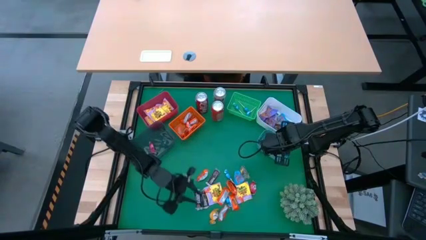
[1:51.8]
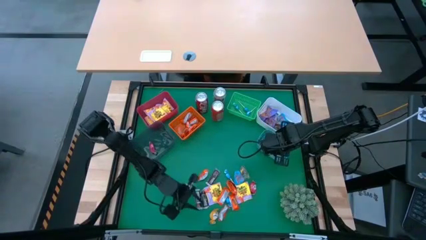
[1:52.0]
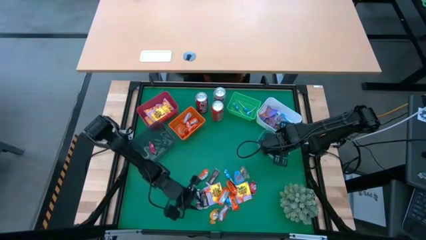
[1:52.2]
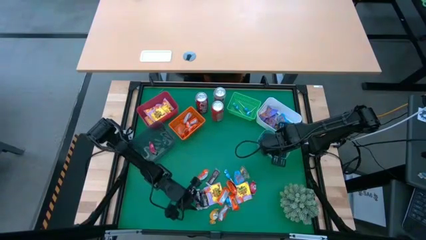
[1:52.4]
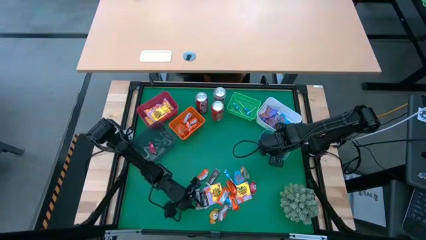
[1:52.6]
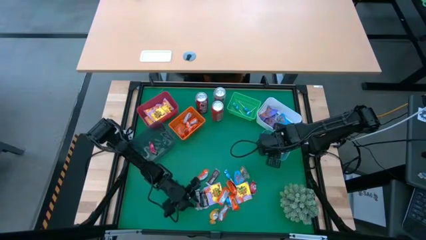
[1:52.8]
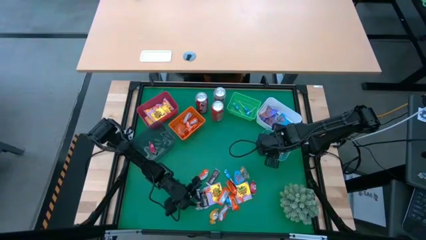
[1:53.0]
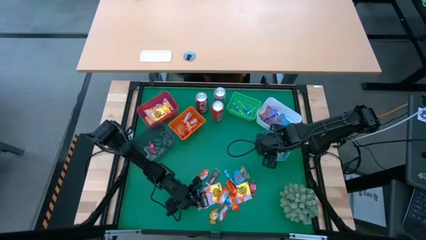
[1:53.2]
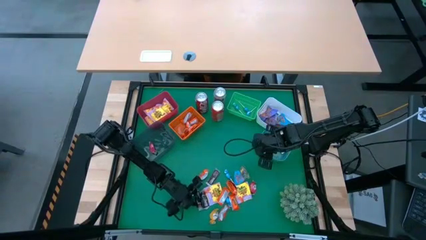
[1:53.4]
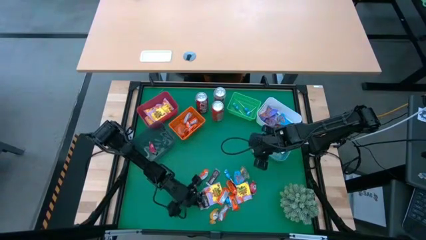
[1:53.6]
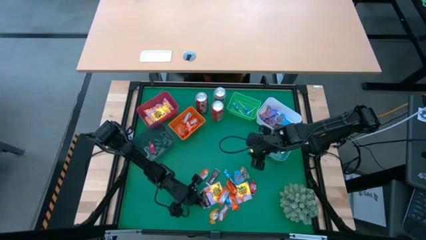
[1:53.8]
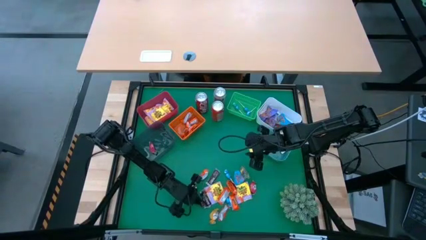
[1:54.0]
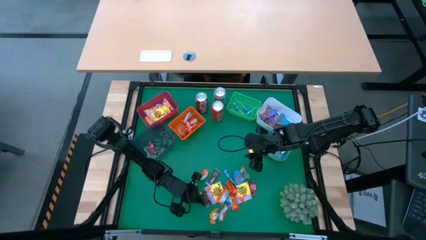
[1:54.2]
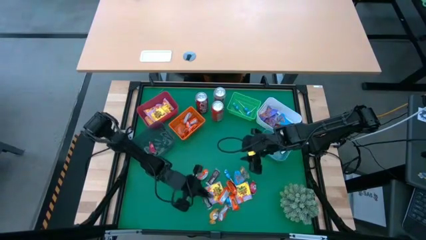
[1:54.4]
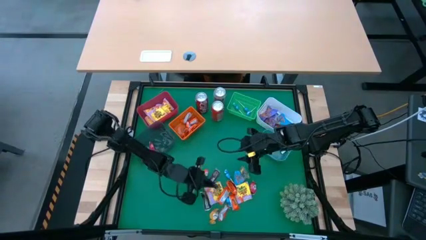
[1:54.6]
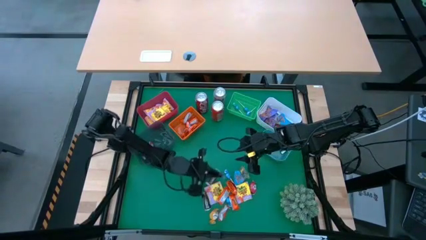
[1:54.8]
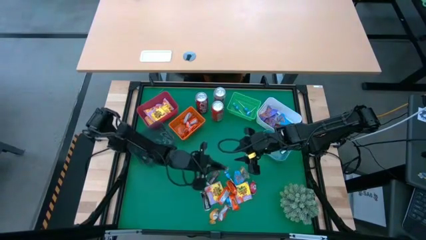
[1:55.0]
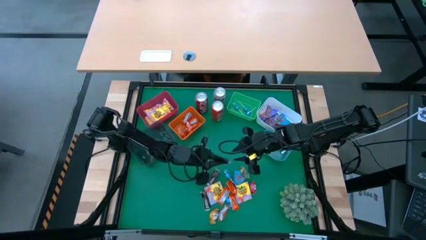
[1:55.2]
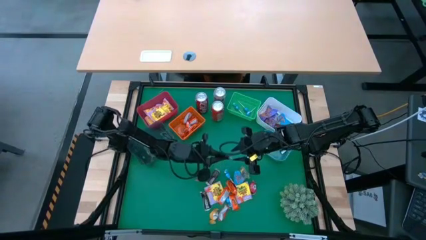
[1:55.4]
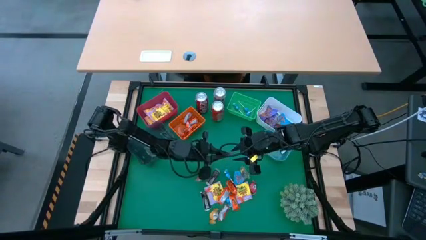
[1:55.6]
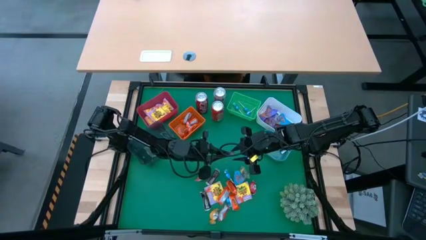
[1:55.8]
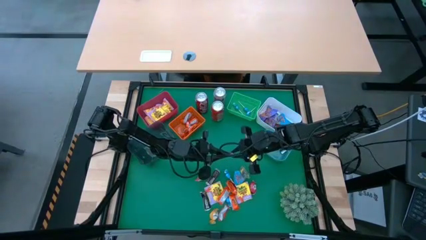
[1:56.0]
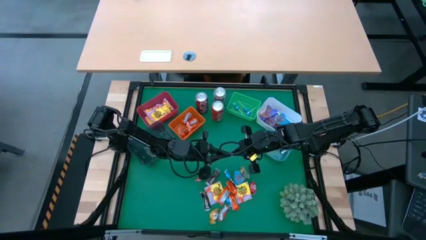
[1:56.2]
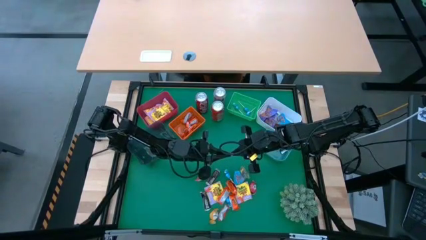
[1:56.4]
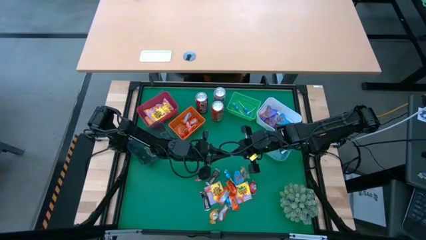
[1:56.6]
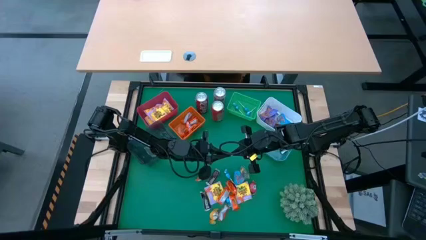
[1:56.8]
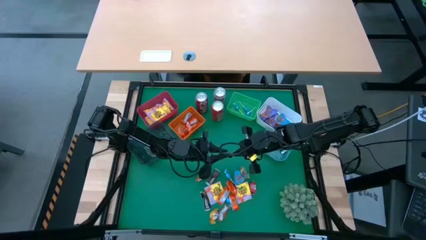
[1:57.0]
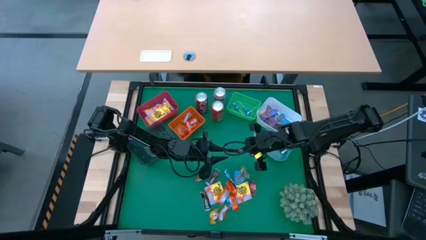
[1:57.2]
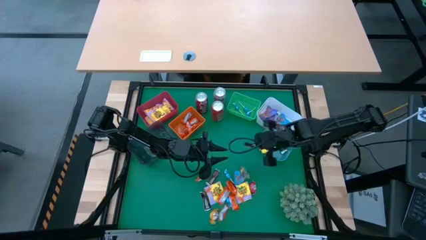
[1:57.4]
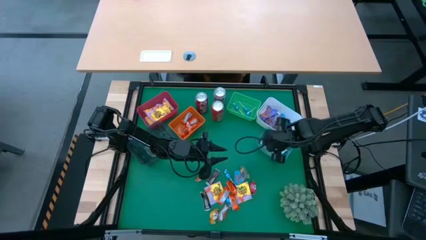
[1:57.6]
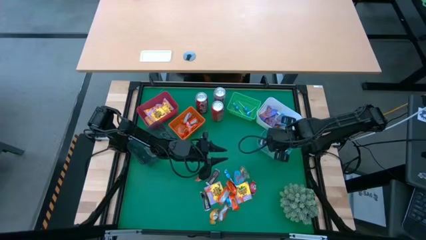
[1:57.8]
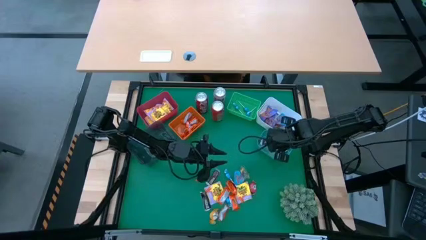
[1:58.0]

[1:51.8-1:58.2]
Task: Sort candy
Put the brown chocolate into the blue bin

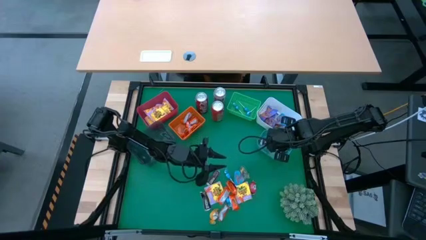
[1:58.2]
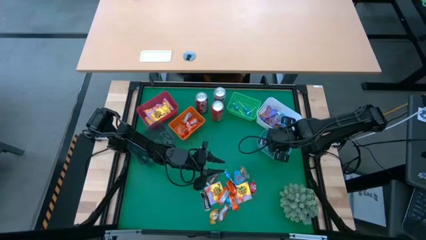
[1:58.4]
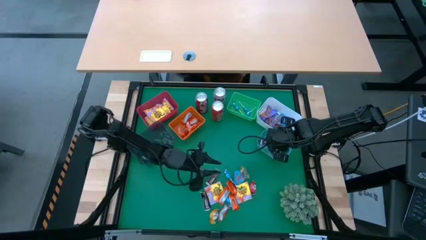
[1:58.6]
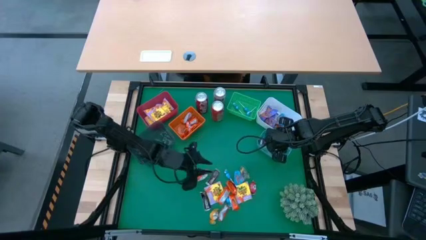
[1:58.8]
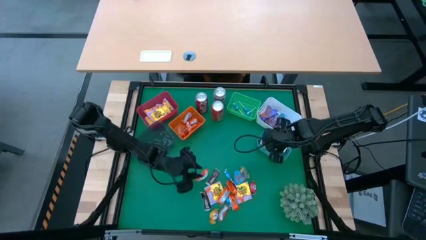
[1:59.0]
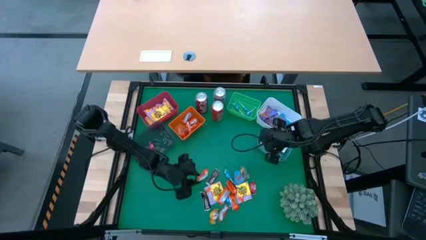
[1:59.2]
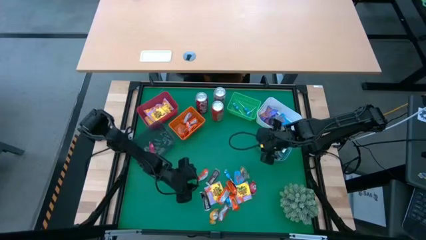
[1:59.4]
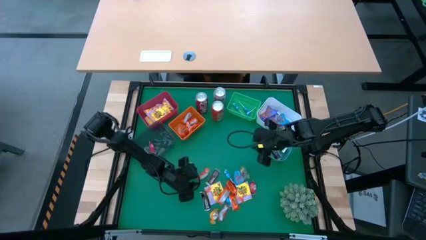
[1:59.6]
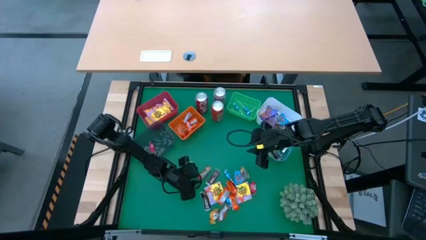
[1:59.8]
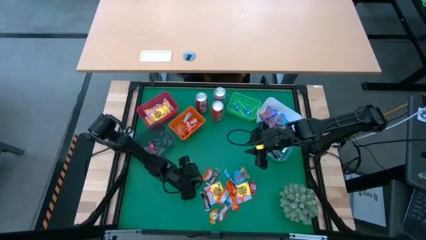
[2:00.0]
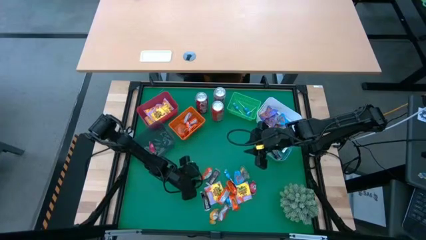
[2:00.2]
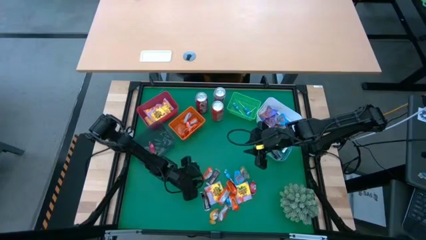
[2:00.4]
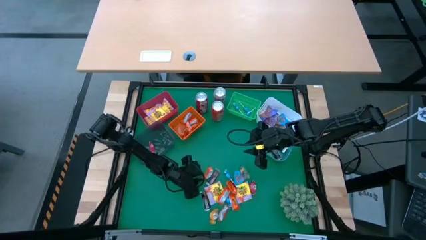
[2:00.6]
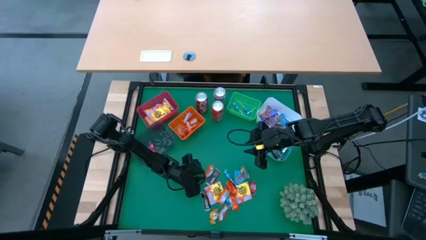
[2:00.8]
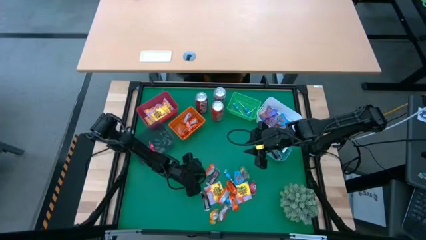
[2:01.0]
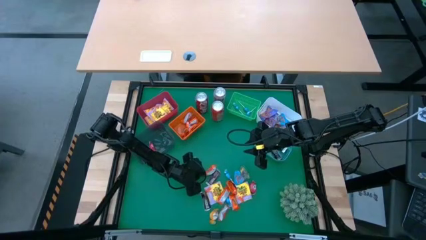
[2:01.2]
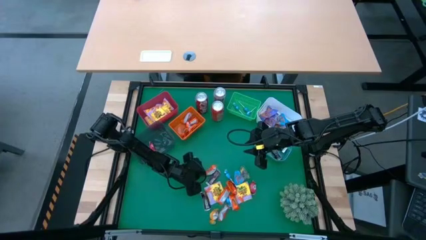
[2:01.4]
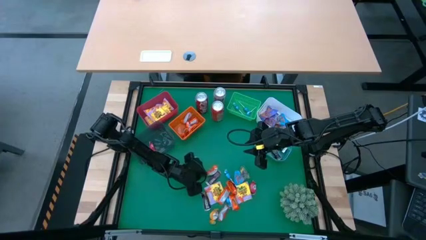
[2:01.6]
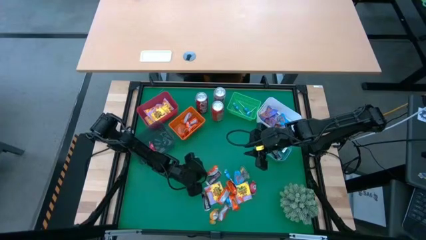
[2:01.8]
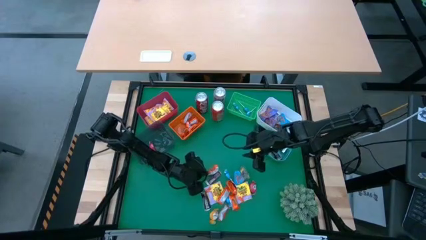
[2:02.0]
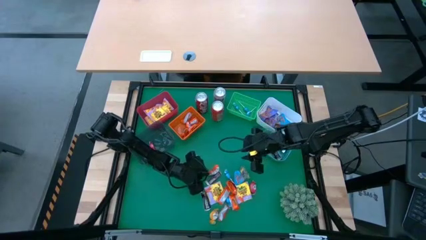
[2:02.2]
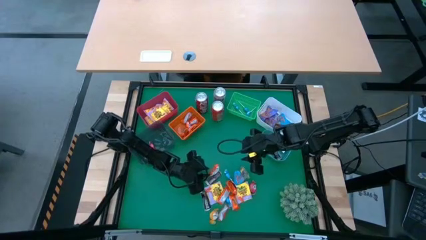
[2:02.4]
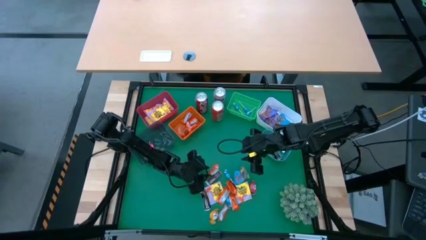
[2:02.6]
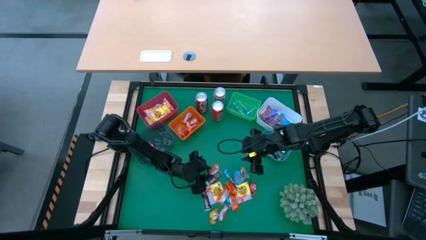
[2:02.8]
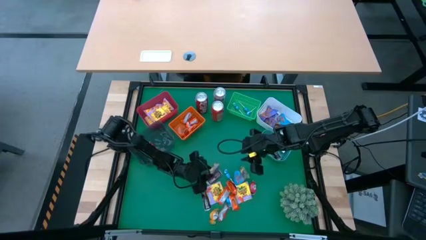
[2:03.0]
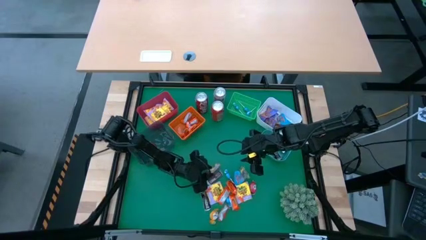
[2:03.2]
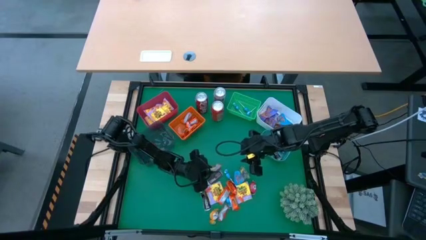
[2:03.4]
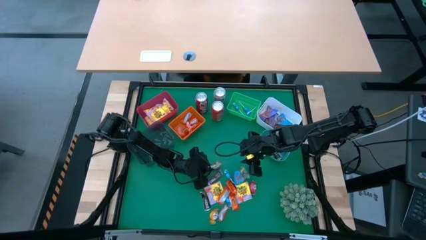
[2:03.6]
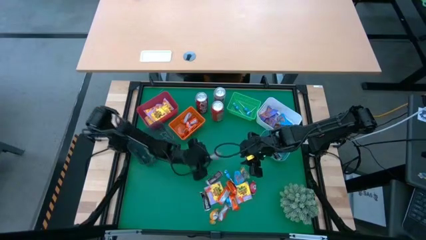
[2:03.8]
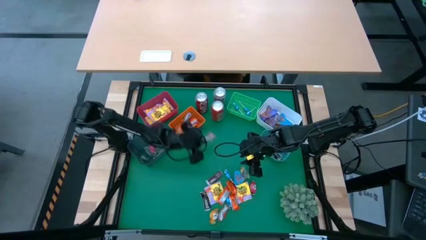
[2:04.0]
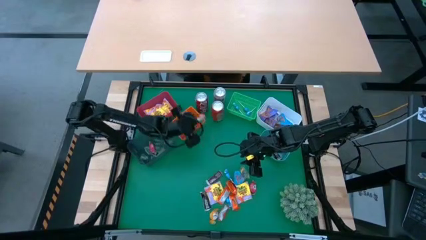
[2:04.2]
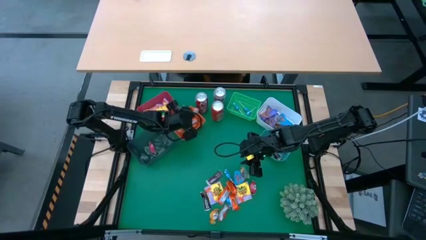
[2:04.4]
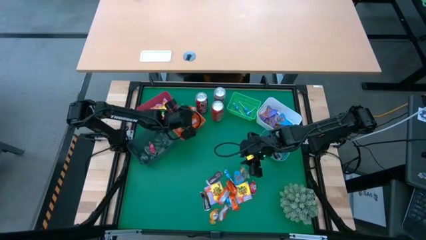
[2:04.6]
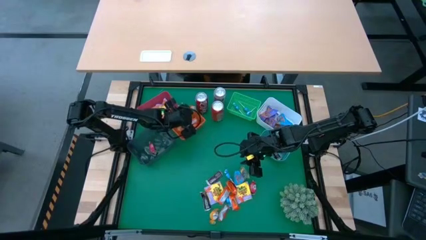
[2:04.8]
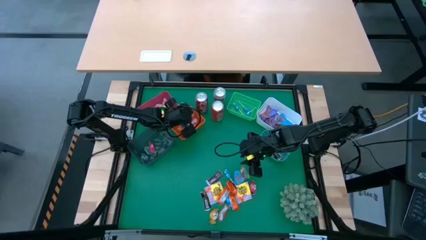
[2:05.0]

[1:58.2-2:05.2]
Put the orange chocolate into the orange bin

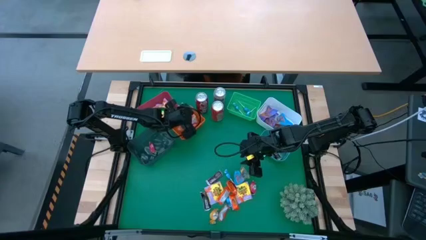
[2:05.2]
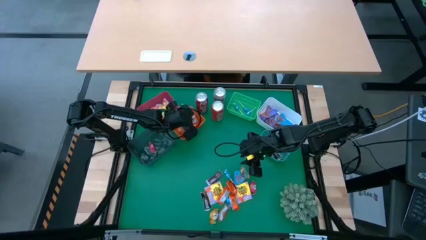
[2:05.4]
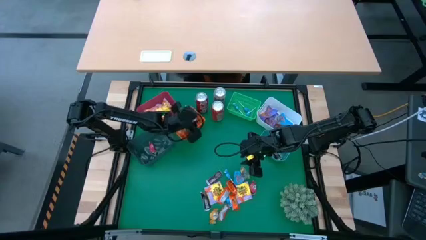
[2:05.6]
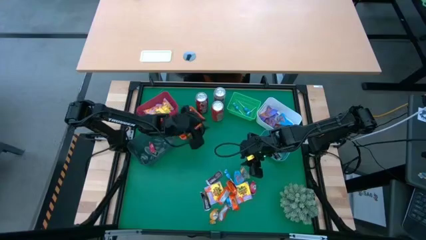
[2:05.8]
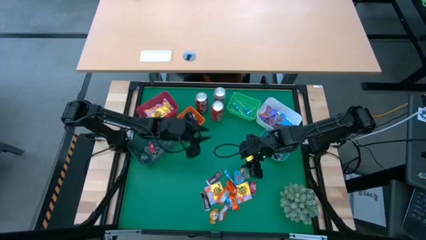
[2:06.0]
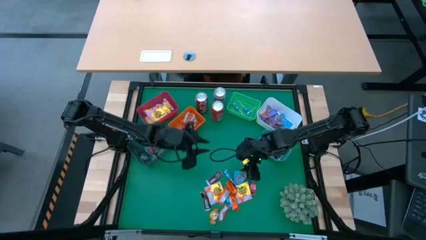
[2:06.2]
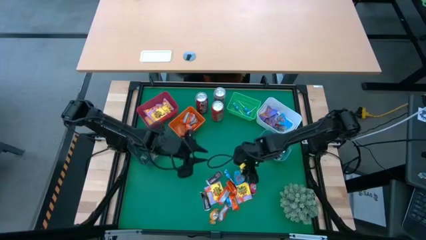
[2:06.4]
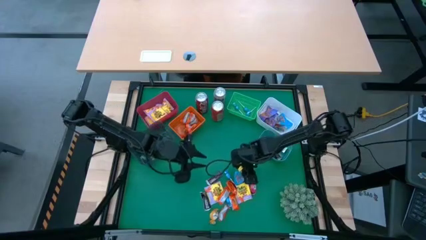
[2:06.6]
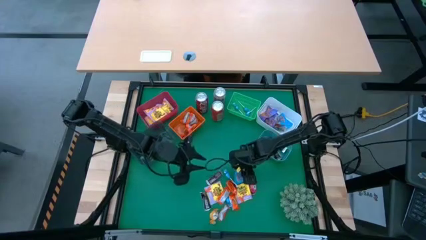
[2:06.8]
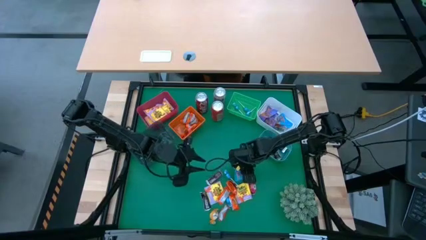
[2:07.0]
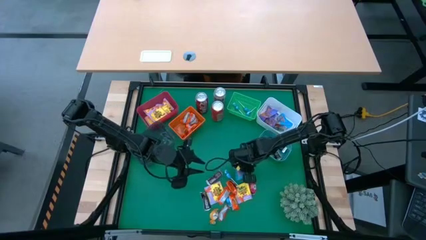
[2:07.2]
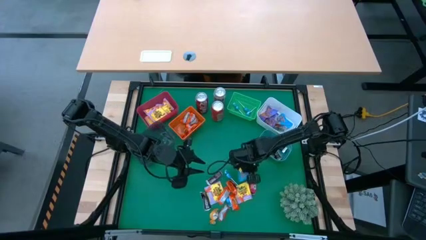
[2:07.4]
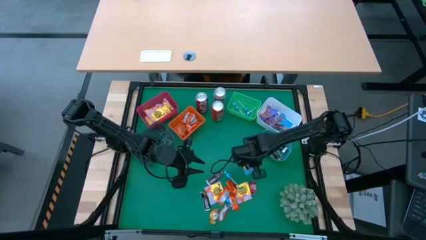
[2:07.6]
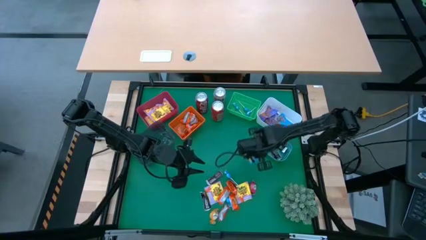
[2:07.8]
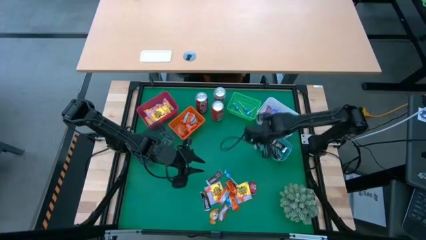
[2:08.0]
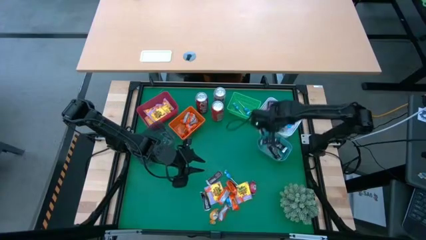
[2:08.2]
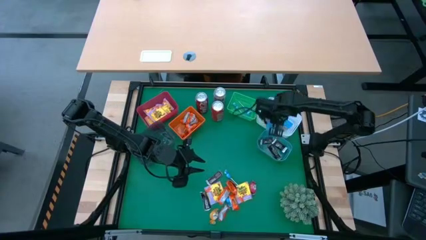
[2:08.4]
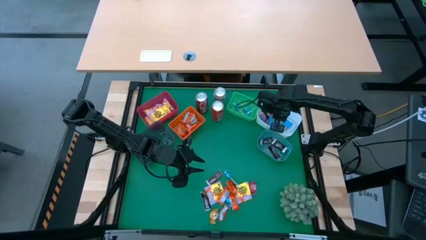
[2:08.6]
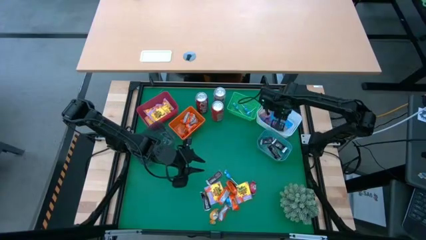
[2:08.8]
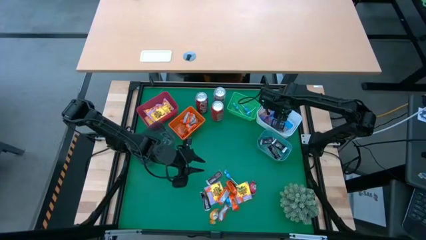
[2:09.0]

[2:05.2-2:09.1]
Put the blue gummy into the white bin
